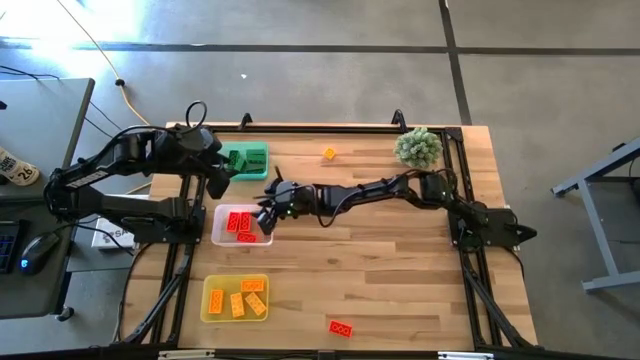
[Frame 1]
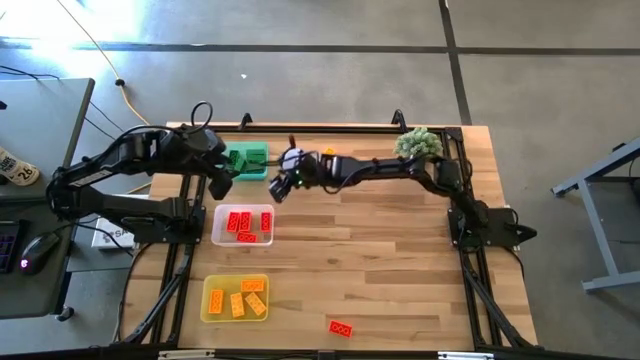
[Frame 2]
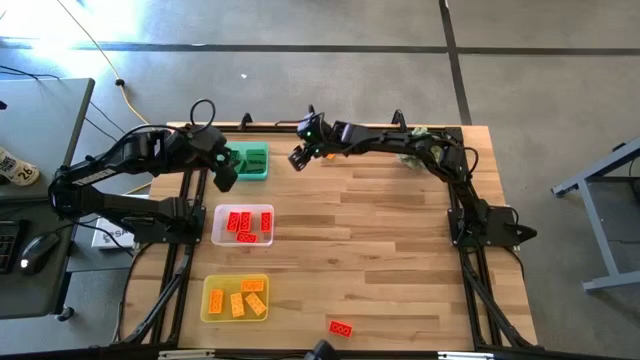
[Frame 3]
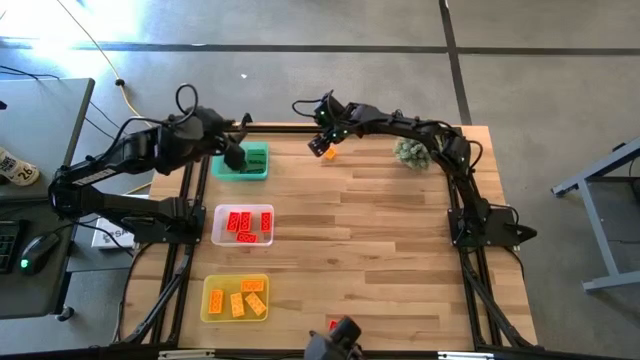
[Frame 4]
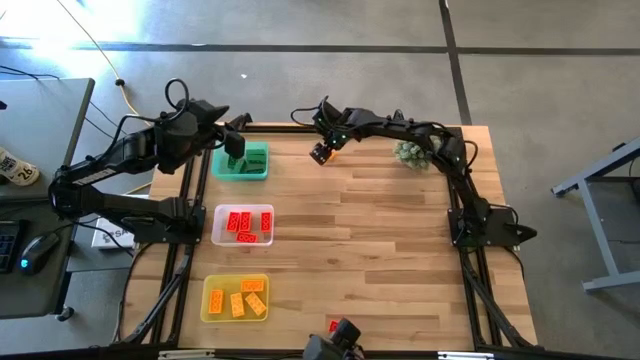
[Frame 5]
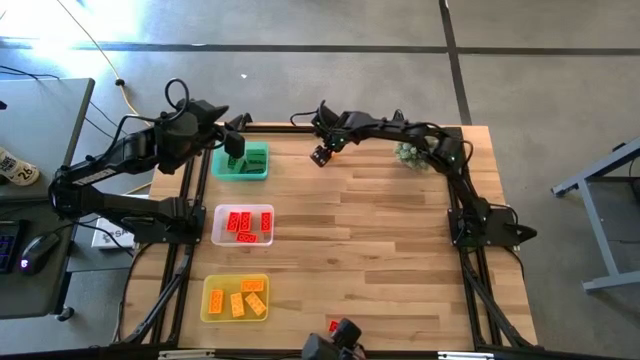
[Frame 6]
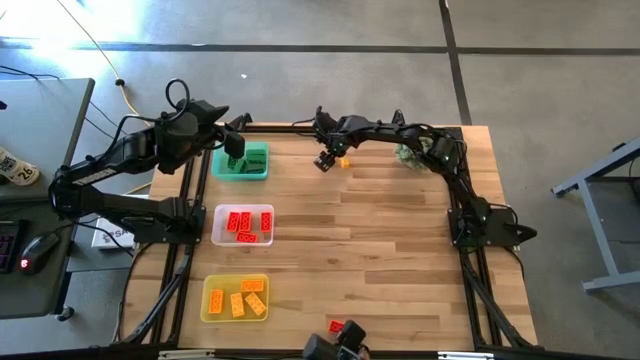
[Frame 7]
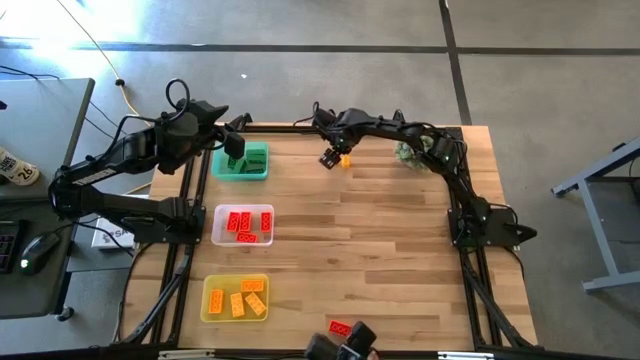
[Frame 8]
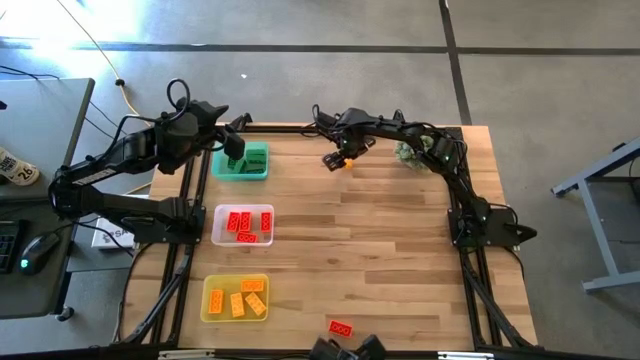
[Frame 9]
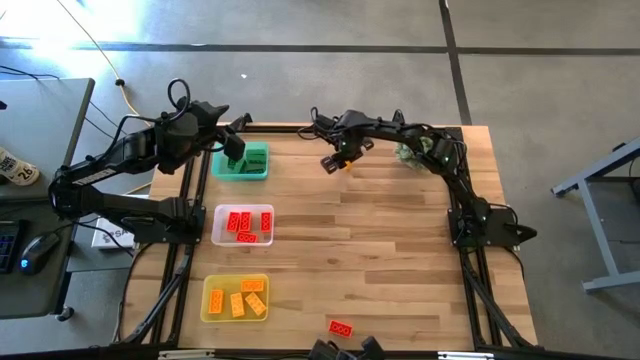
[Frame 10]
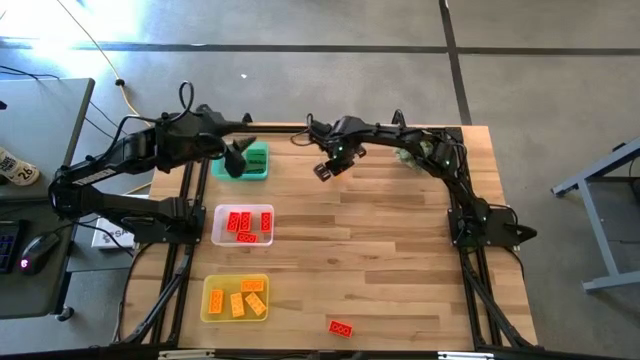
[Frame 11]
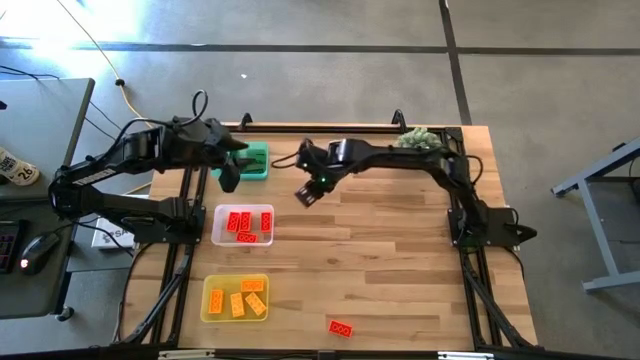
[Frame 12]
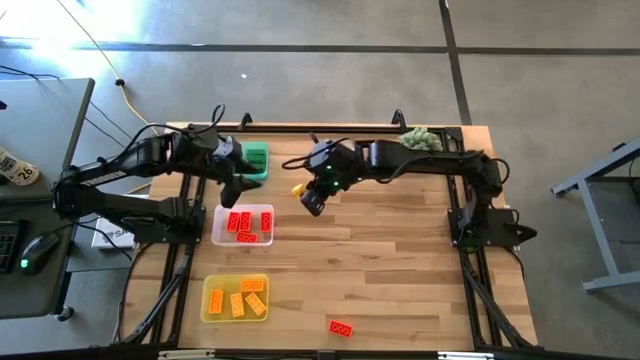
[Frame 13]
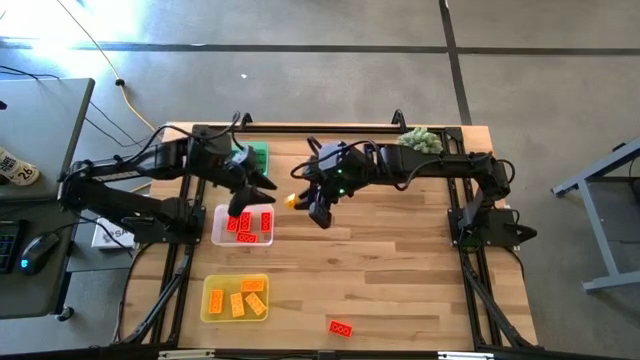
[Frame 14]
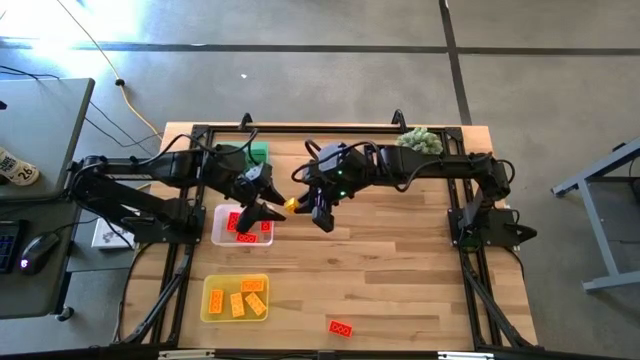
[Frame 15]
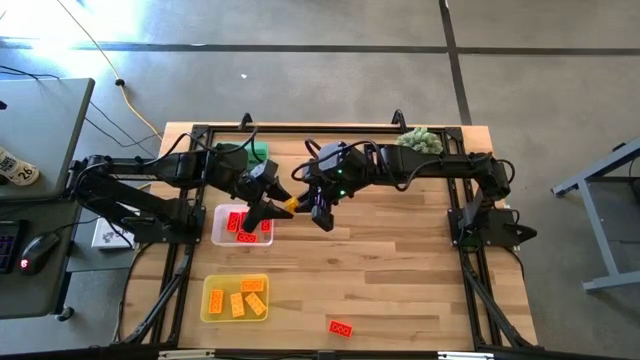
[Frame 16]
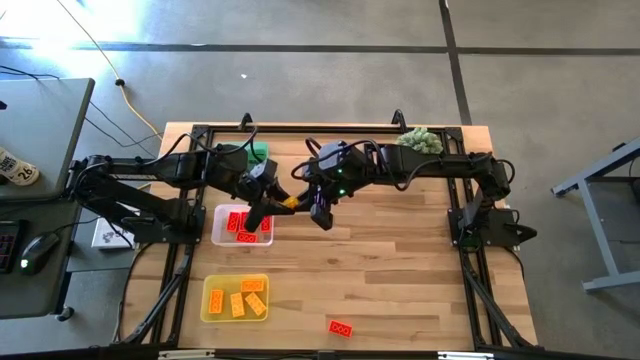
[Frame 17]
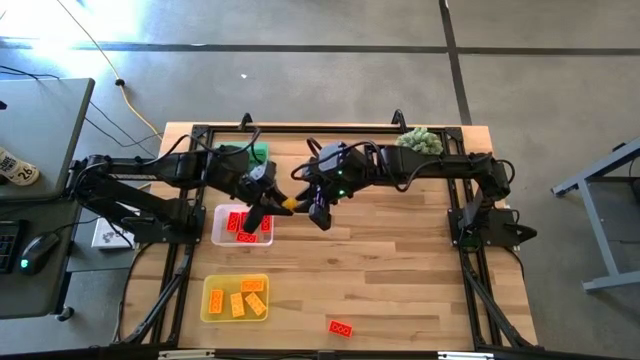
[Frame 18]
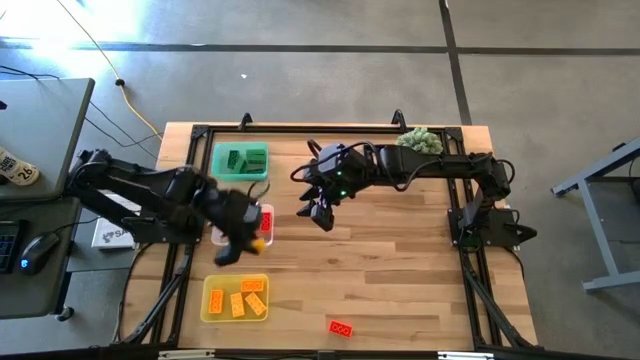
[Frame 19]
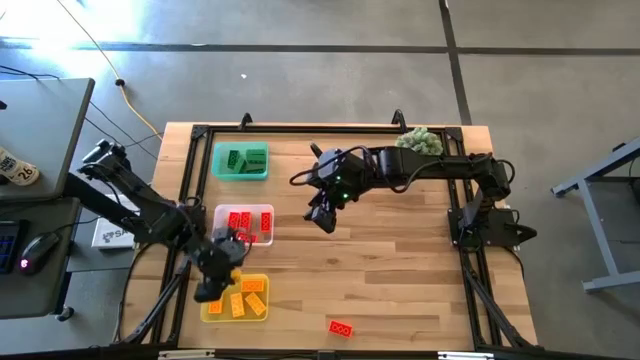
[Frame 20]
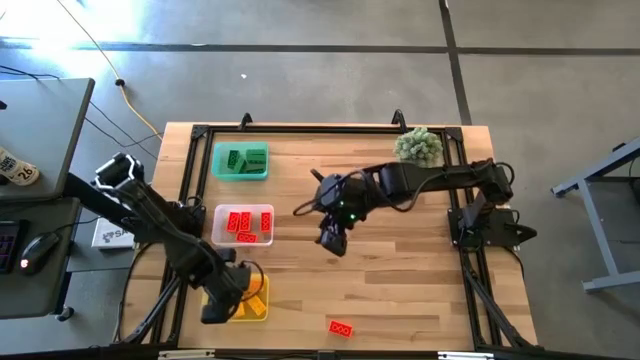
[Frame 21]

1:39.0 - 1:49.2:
Task: Sort & place blocks by color
Put the yellow game piece into the yellow bin

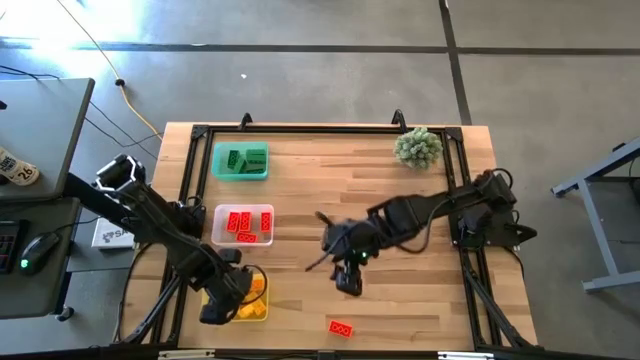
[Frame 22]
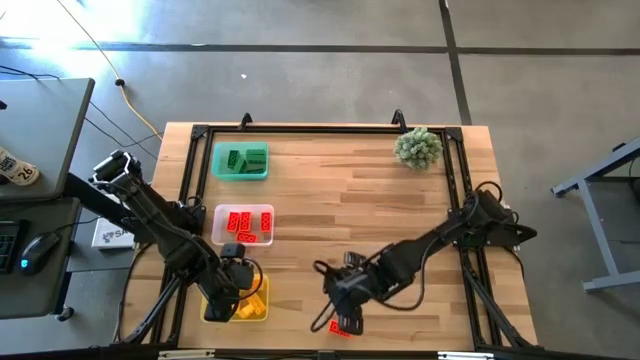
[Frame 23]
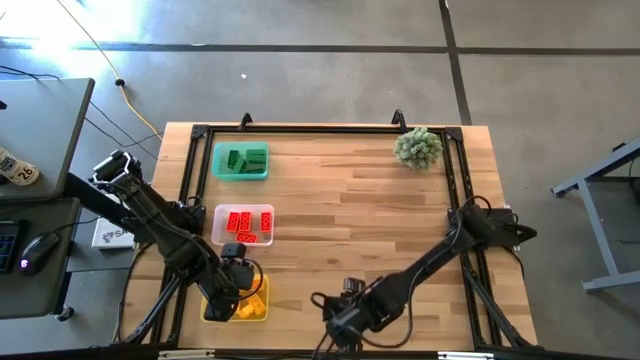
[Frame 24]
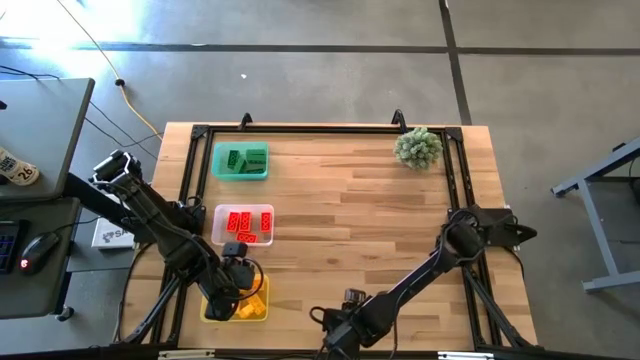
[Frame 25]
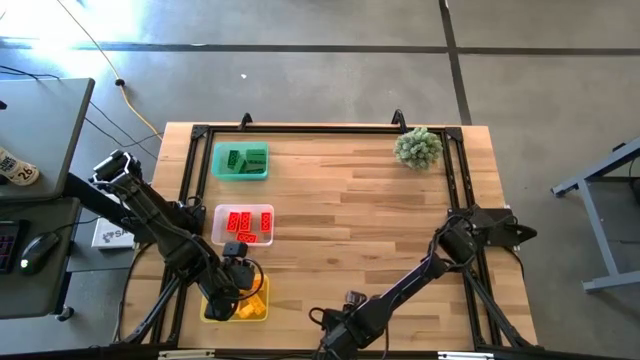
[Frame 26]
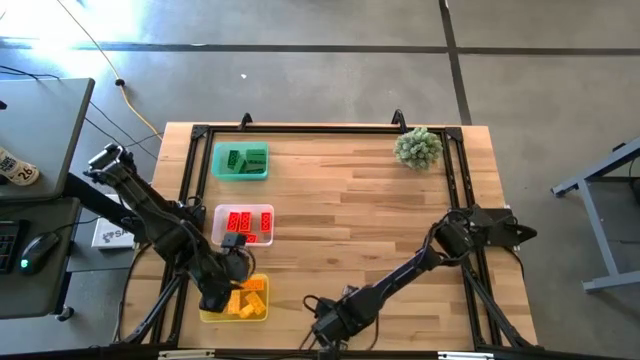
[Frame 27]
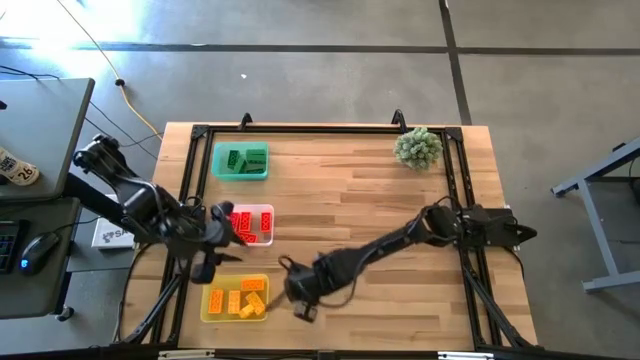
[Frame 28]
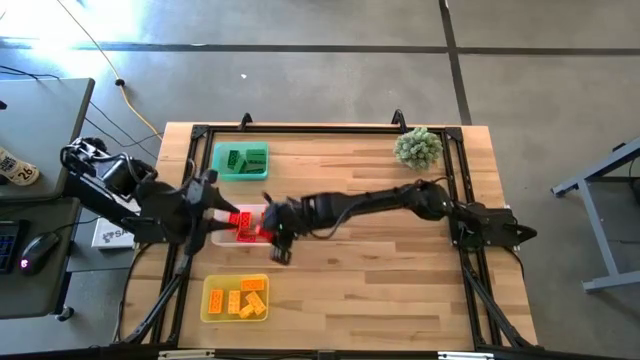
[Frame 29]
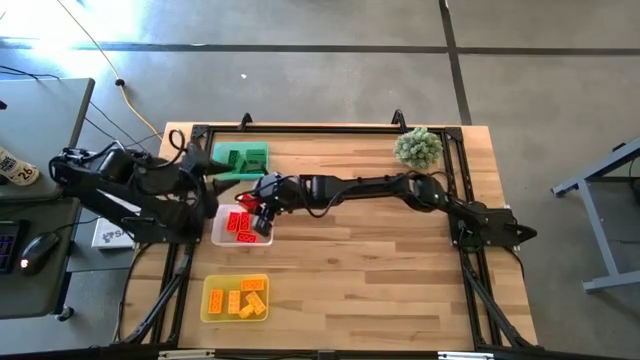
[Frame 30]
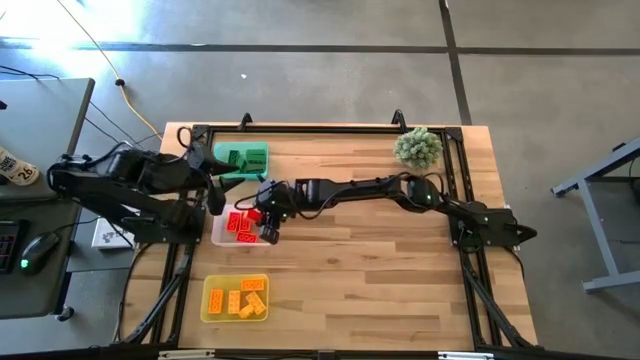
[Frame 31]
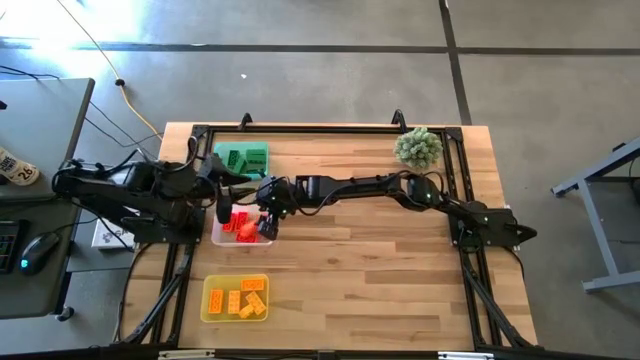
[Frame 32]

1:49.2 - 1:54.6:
Put the orange game piece into the white bin

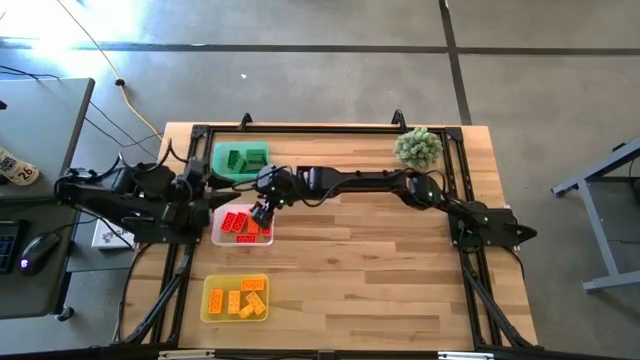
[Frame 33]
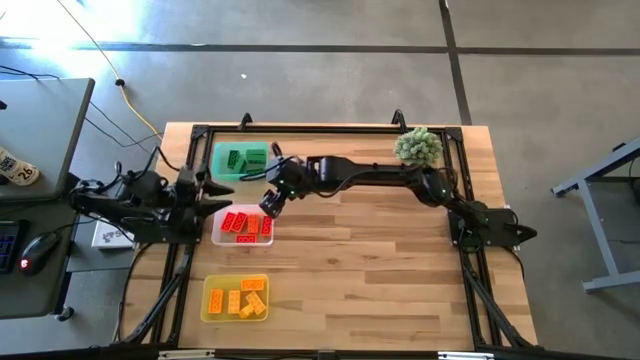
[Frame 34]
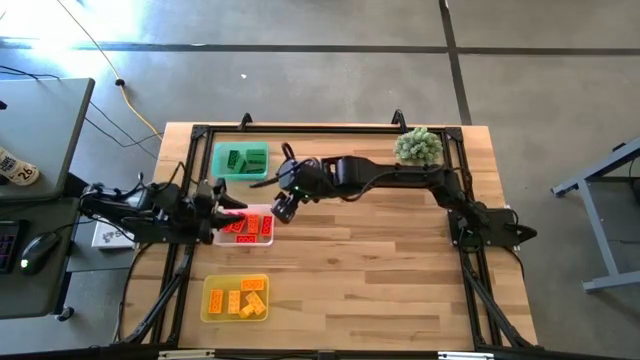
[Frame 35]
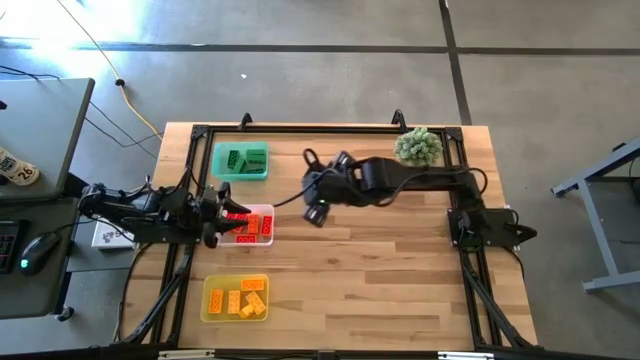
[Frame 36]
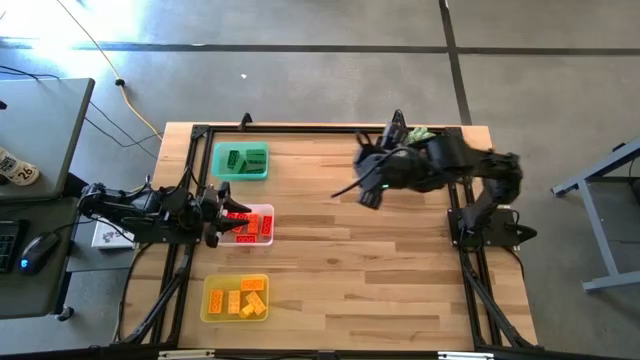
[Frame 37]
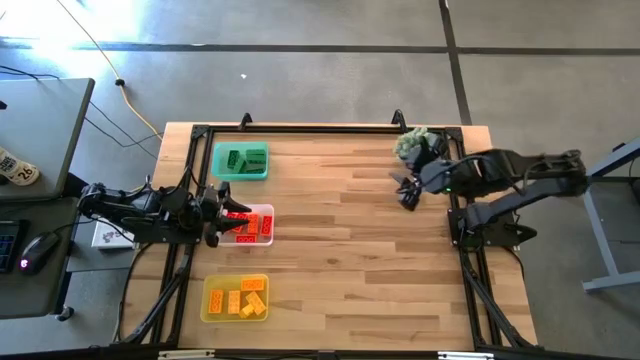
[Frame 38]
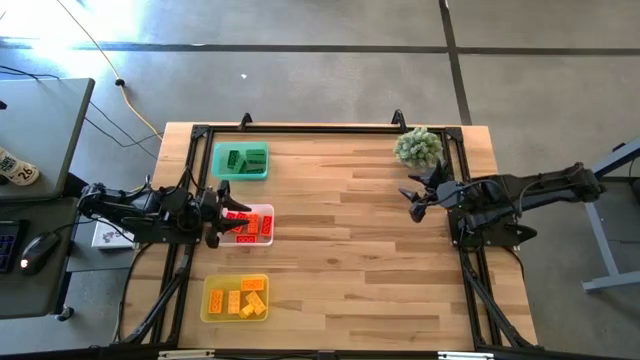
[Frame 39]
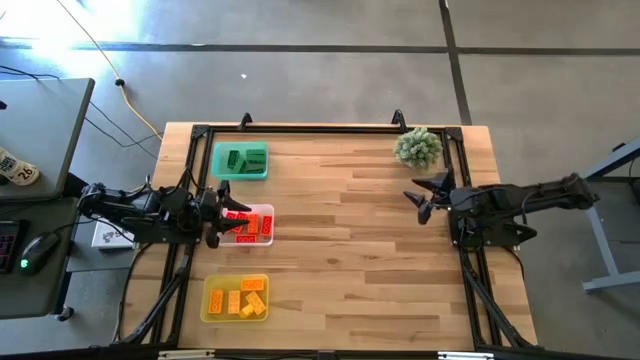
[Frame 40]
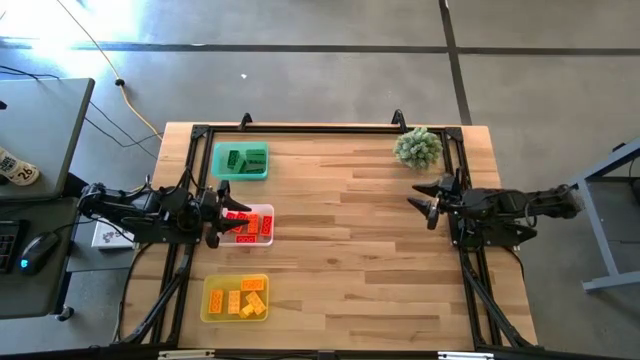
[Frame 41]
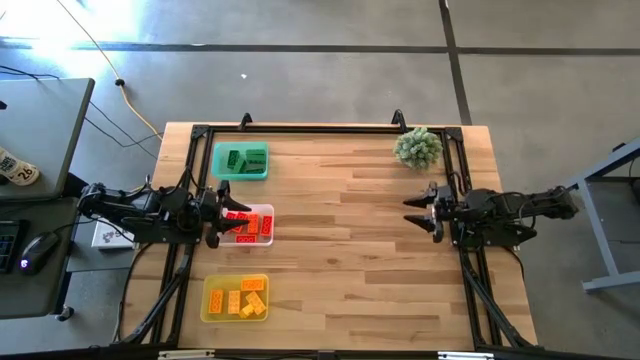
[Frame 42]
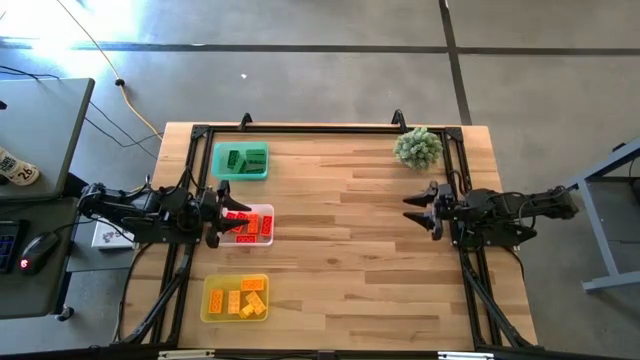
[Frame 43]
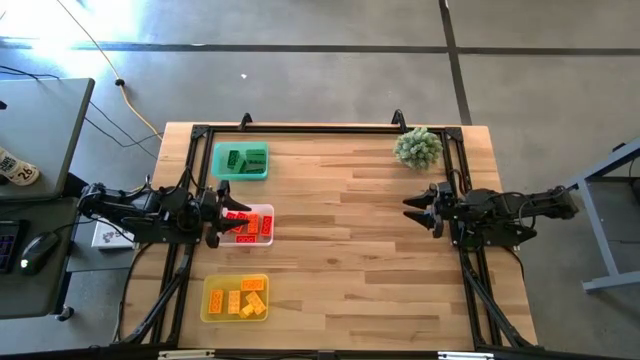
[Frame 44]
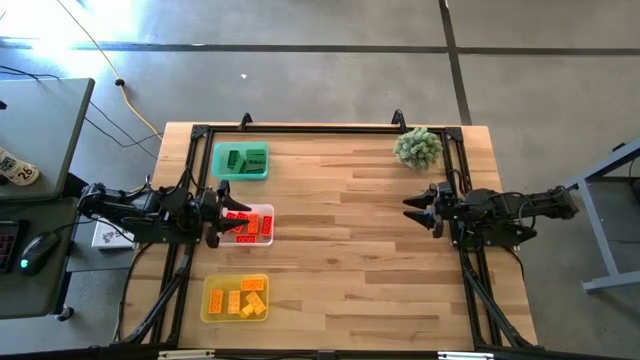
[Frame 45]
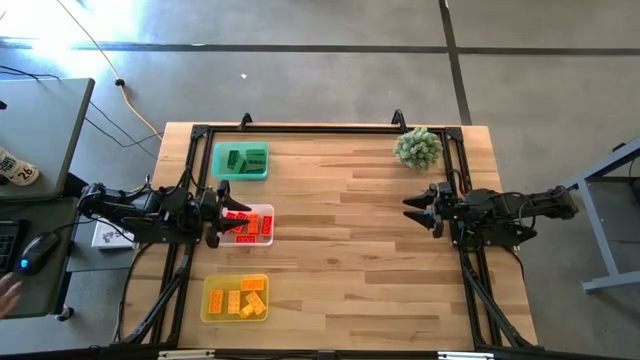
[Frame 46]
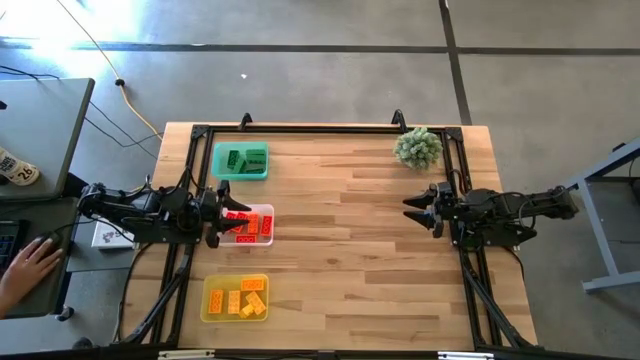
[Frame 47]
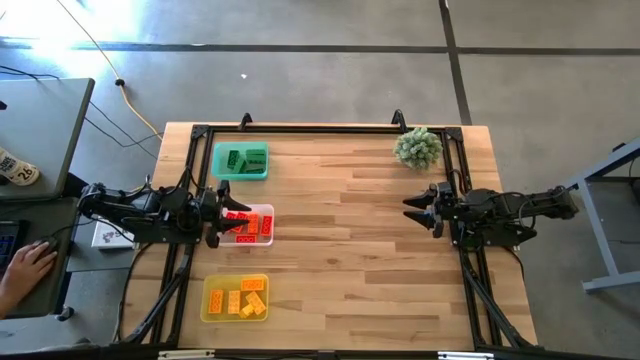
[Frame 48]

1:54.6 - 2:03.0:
Return to Home Position
